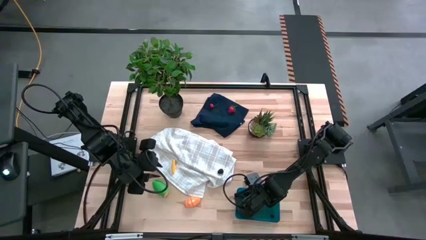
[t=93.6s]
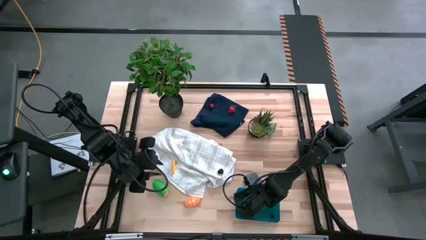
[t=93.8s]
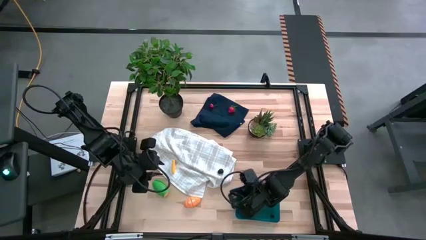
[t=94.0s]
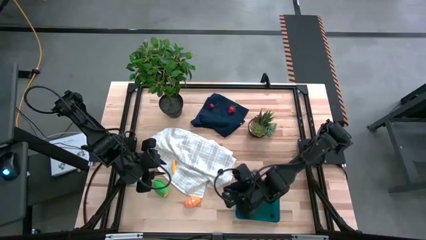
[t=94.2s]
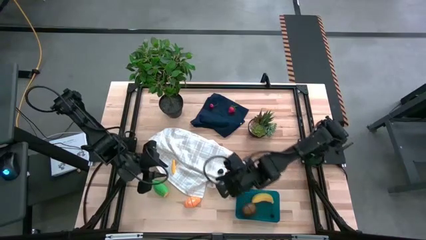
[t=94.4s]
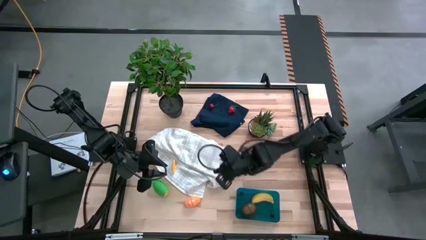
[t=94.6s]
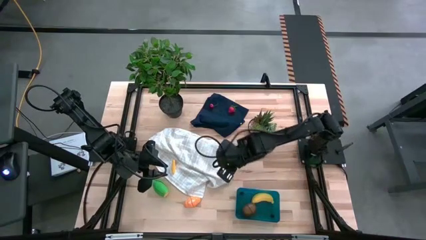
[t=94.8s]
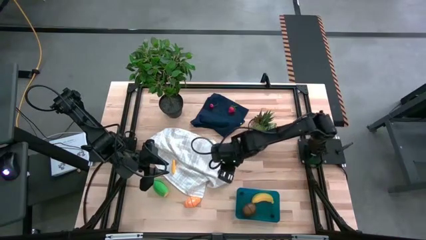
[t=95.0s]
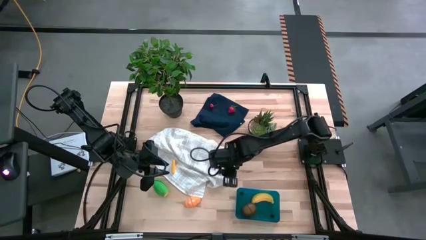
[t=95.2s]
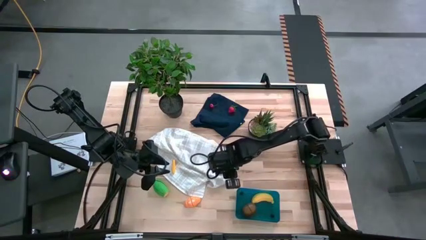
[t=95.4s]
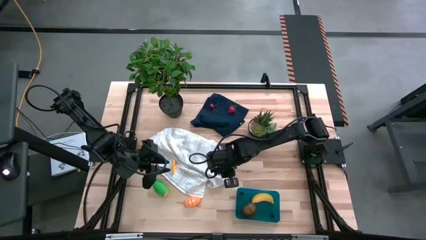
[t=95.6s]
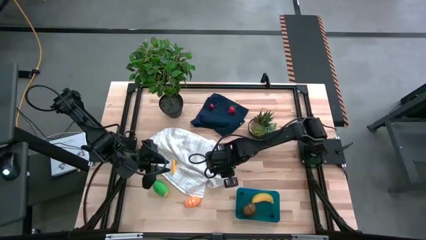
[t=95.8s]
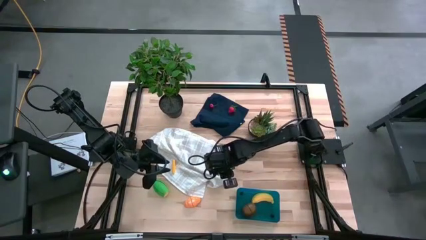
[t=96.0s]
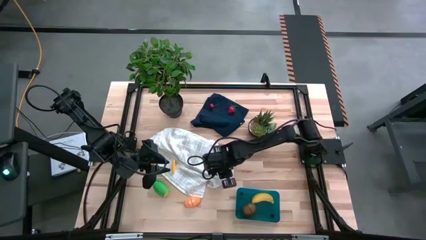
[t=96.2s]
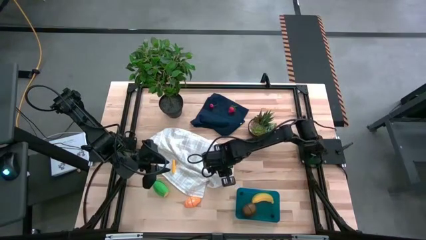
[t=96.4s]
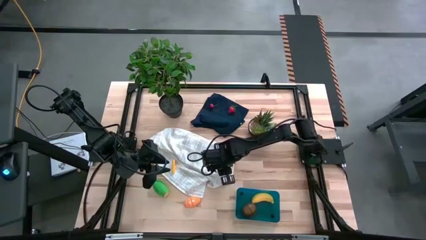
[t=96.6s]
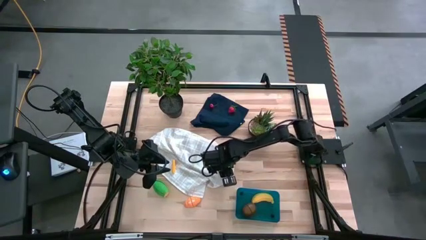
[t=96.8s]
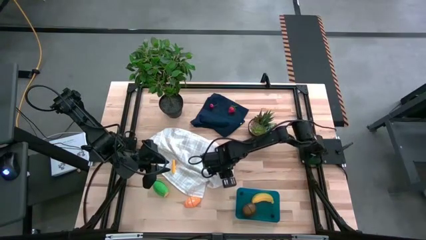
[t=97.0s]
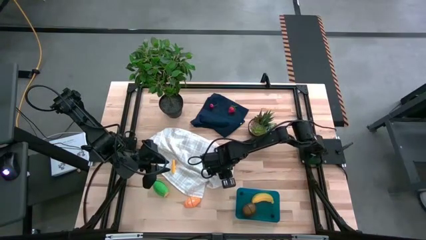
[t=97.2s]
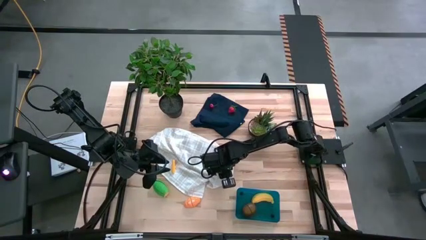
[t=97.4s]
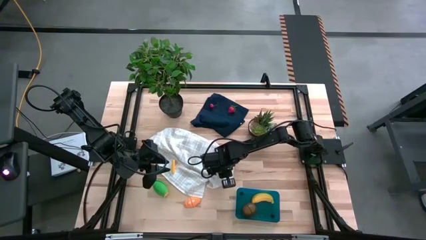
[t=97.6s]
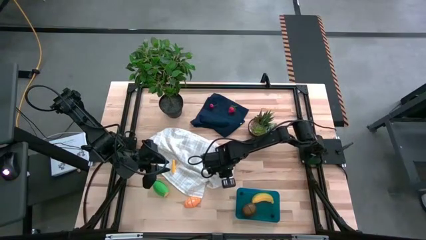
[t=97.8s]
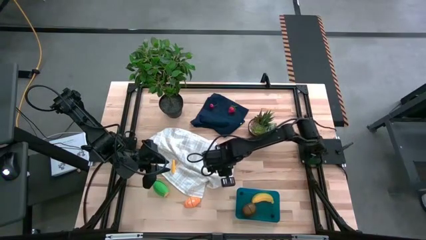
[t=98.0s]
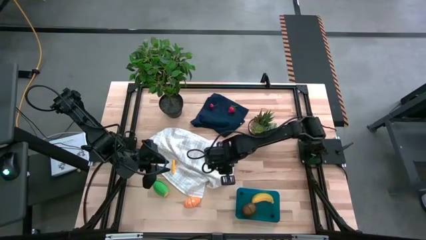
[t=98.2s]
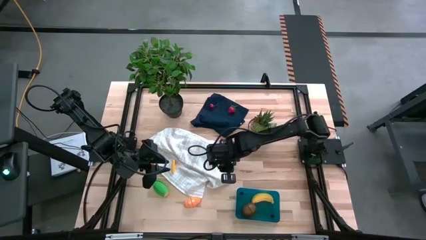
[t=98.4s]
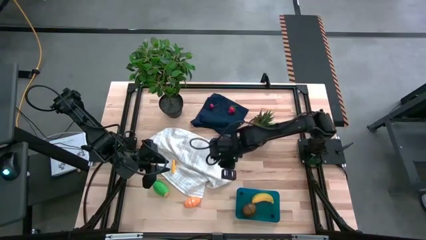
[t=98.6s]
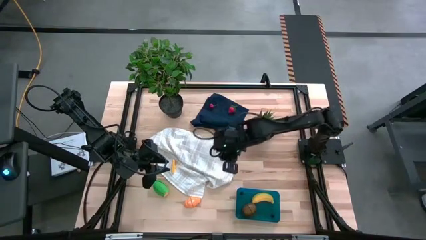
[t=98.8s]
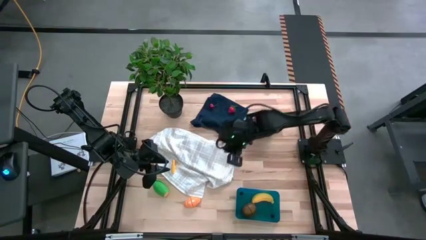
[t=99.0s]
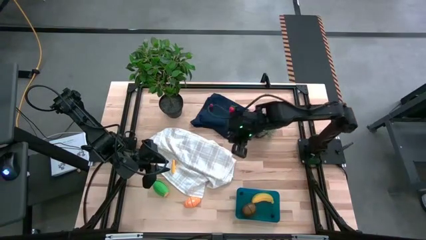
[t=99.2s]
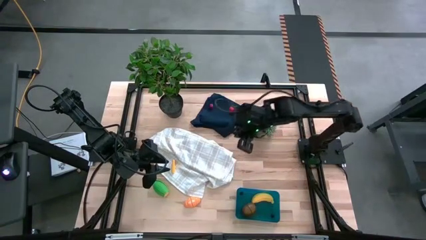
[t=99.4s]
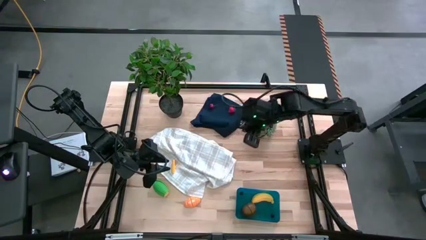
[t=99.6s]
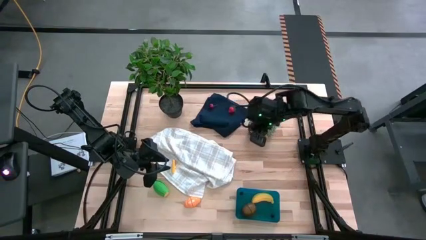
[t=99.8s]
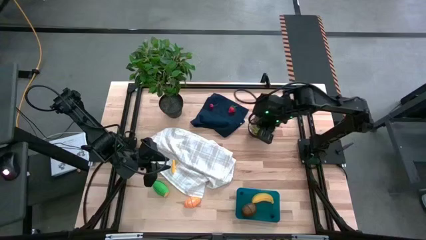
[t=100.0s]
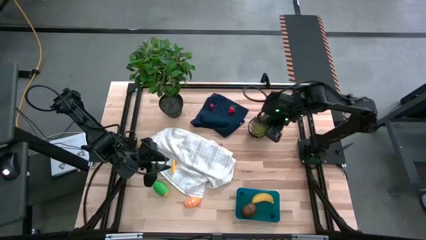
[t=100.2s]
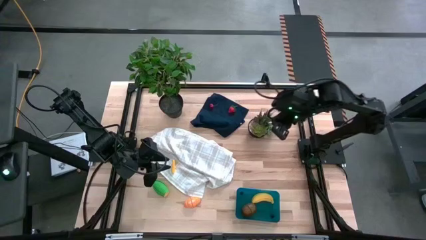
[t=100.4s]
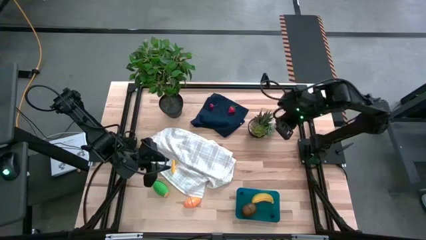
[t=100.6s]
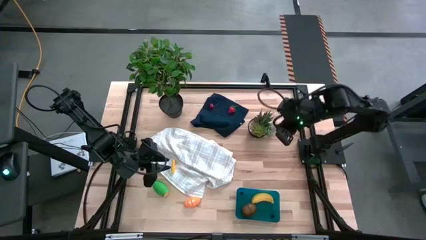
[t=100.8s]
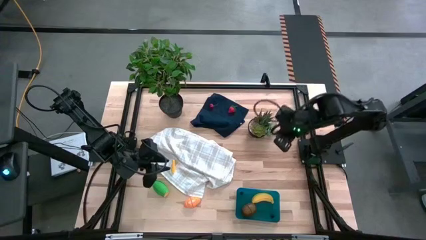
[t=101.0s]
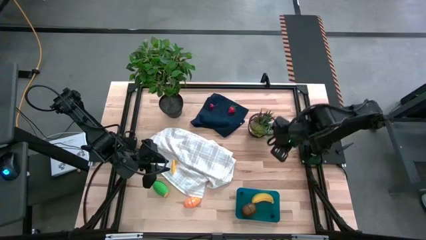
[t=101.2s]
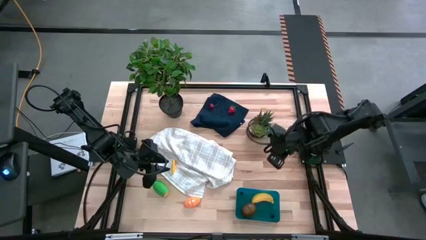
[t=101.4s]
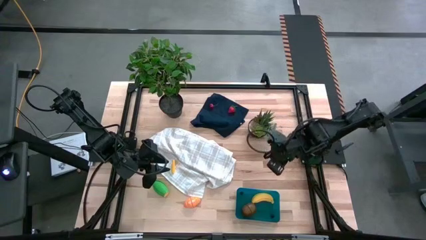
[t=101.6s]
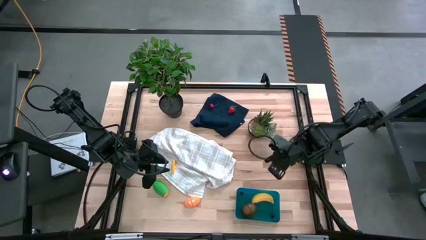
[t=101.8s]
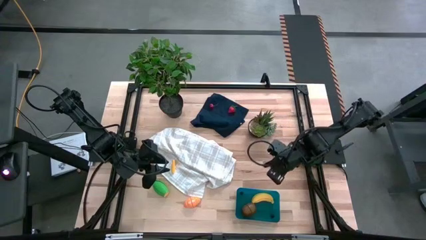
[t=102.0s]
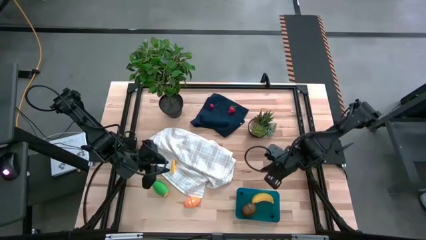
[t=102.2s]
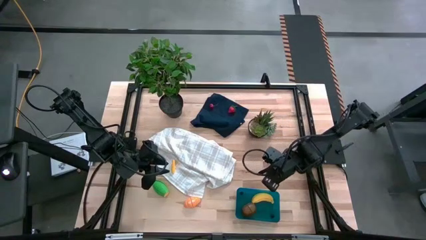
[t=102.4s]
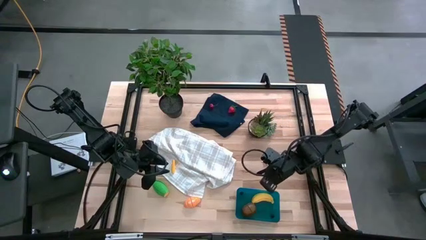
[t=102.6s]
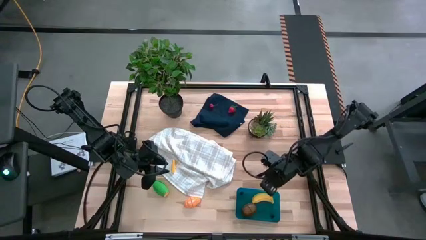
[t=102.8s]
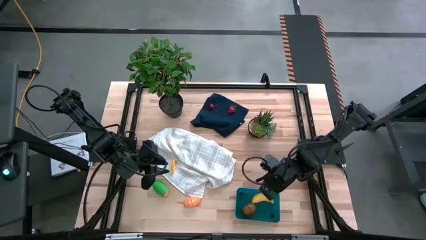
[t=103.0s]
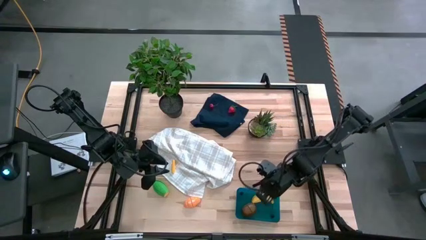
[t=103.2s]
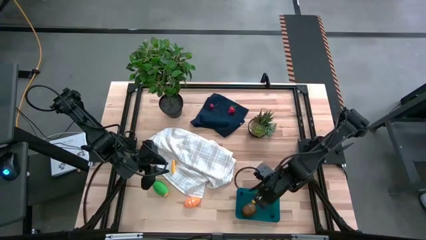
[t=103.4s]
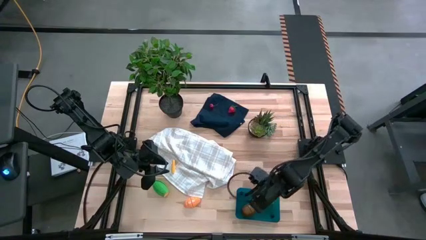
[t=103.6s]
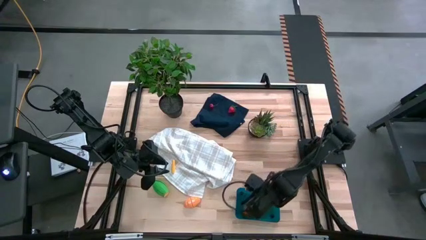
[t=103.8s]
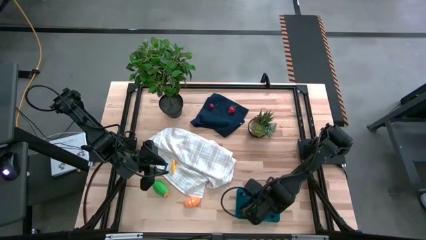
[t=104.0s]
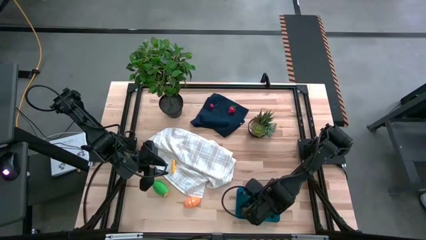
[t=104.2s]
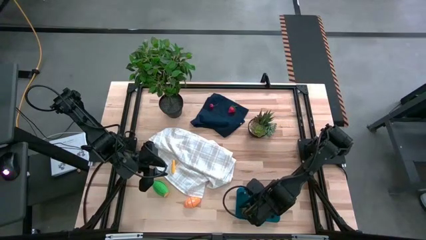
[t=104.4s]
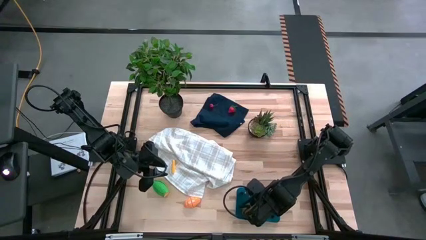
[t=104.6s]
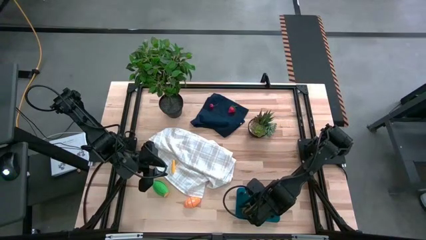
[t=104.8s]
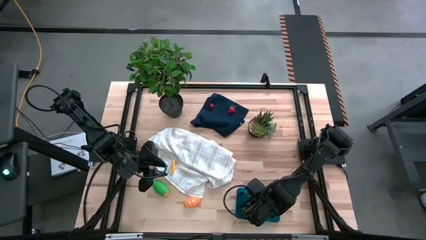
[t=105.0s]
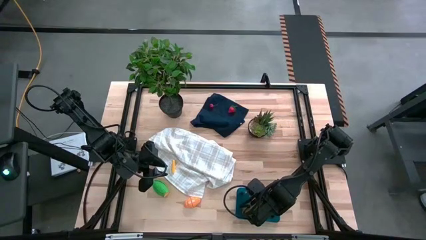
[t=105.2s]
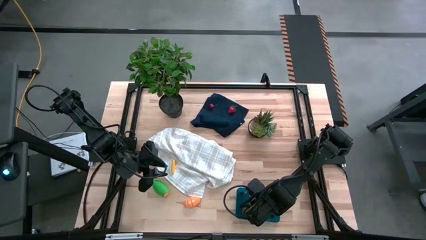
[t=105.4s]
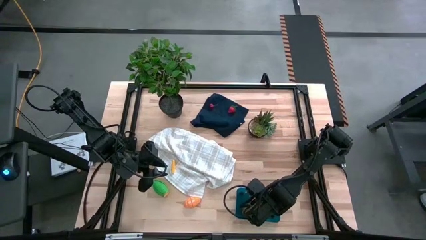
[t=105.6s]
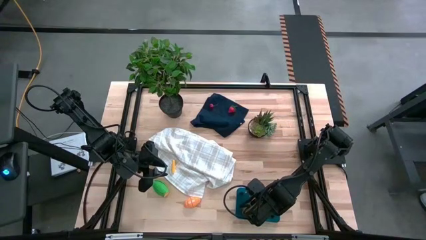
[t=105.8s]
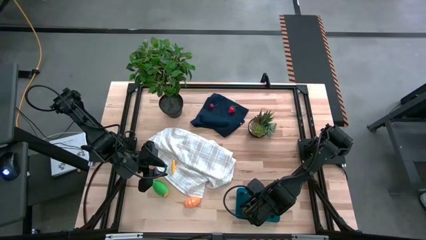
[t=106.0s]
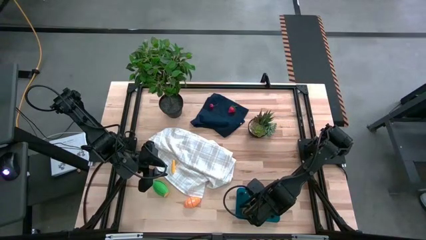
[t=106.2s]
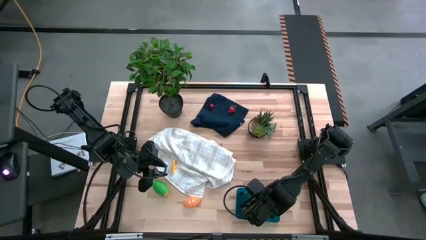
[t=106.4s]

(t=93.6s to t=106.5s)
Task: Pick and placing Produce into tupperware
Put the blackberry into the bin

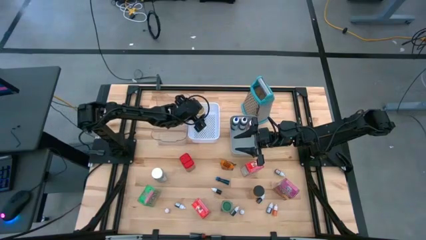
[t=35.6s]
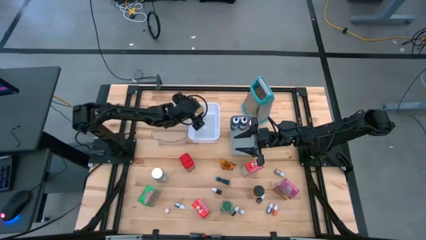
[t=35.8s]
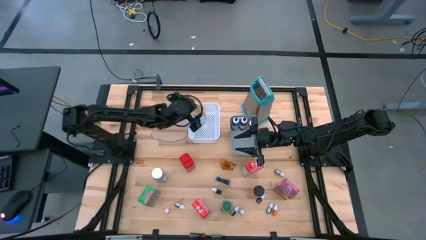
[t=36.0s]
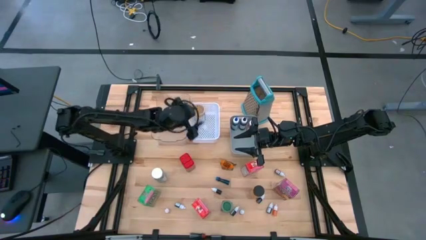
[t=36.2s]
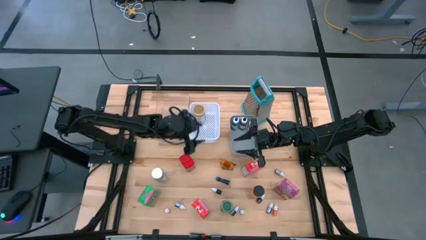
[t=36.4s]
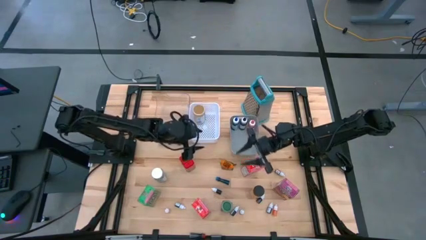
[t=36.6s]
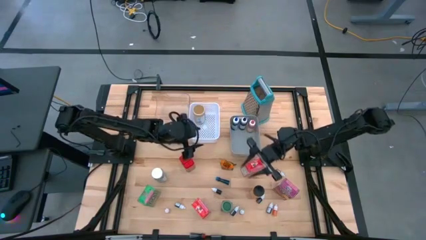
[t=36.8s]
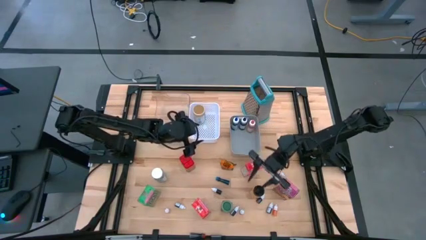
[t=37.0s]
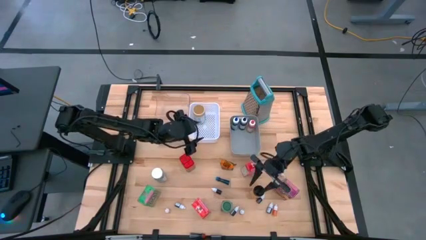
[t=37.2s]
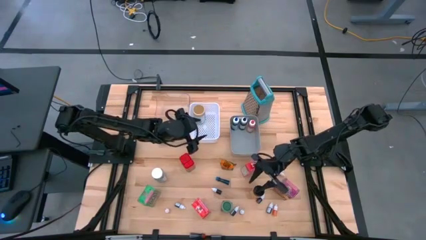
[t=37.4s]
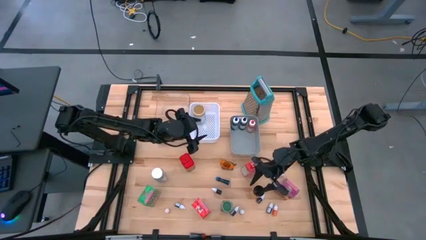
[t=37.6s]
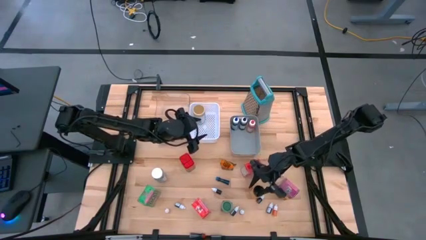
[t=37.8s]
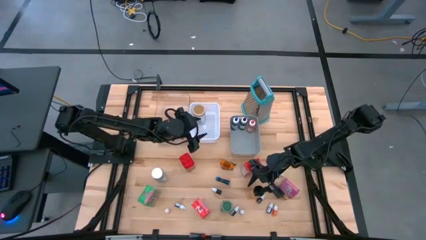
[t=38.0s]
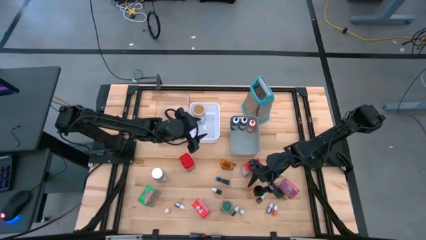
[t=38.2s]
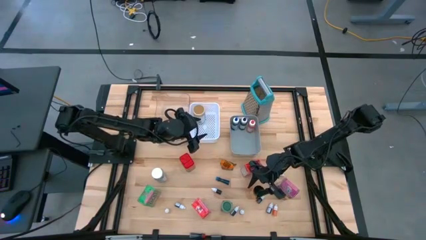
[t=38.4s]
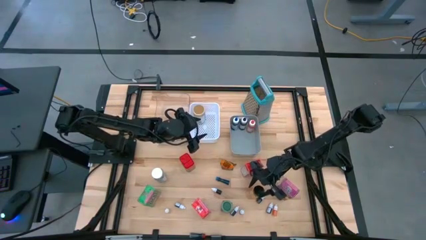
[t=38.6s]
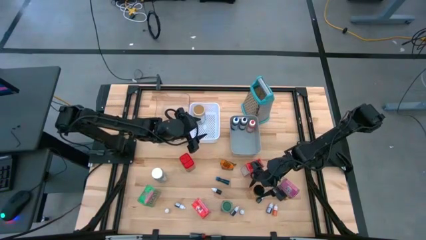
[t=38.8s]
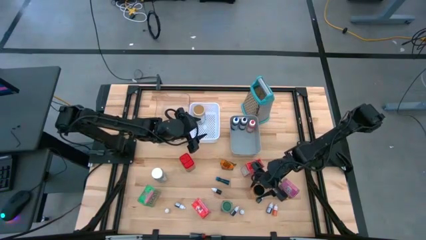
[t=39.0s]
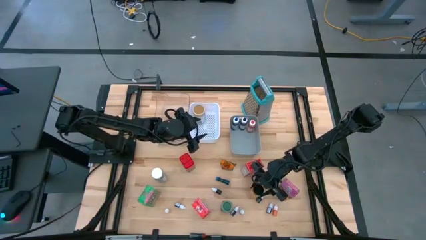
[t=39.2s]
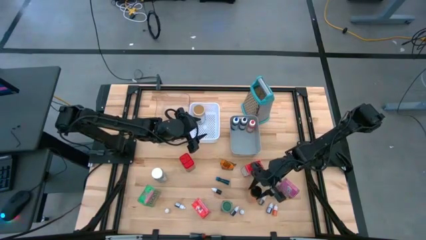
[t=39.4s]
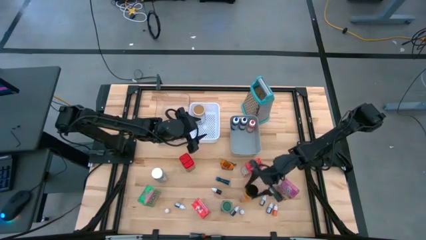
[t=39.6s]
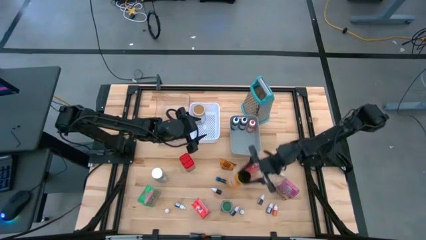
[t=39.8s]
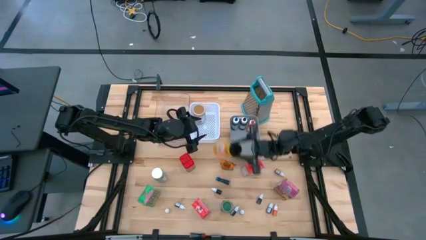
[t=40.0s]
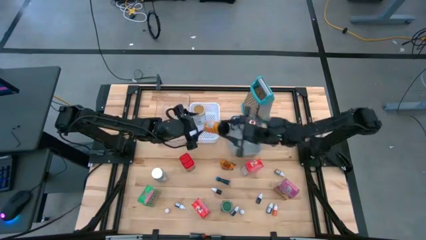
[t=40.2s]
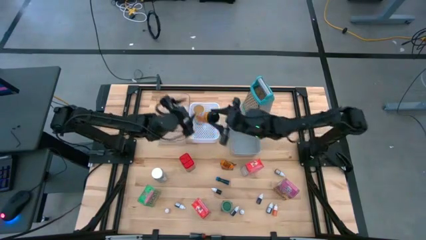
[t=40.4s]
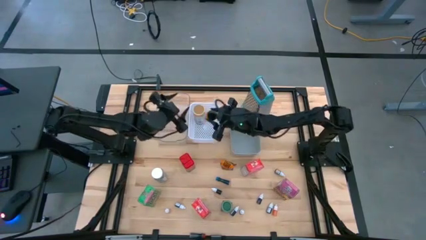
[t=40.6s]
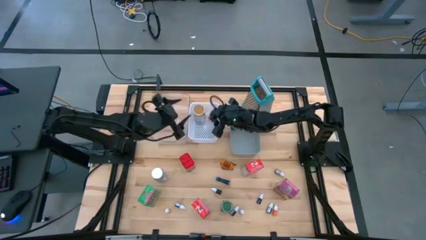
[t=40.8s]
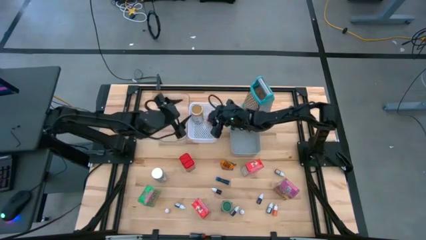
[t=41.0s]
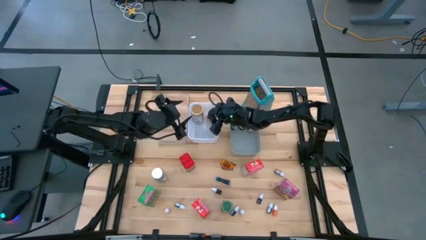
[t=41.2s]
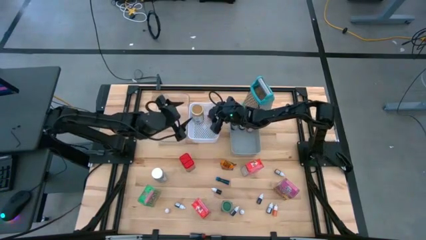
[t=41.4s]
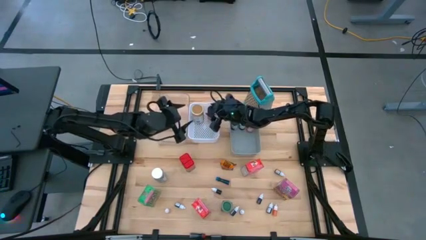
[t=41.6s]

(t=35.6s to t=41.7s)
Task: Pick & Place Kitchen Items
Put the black spice bottle into the white basket
